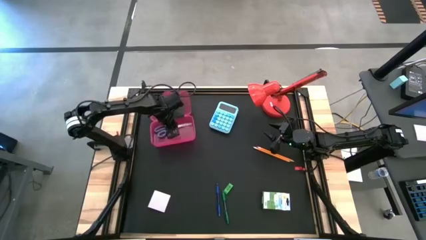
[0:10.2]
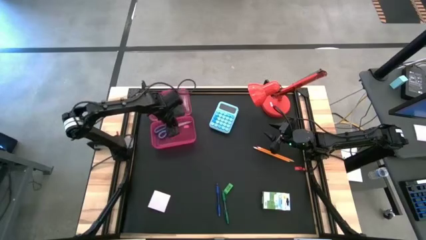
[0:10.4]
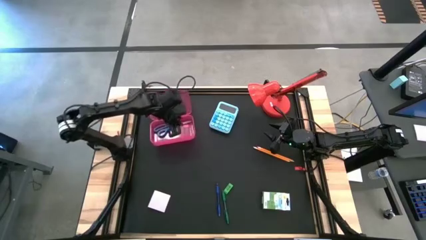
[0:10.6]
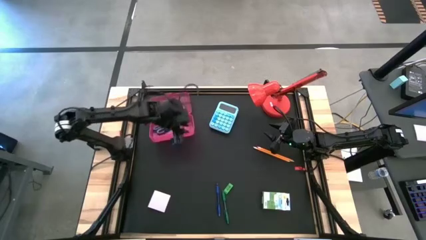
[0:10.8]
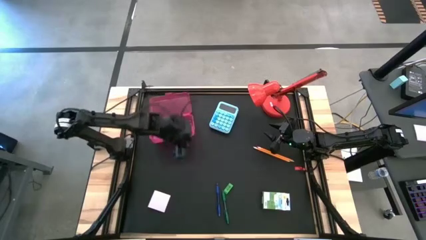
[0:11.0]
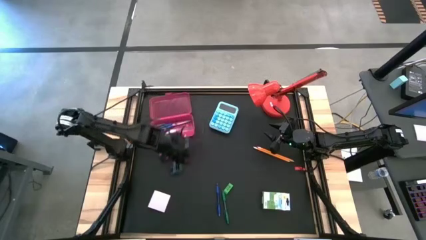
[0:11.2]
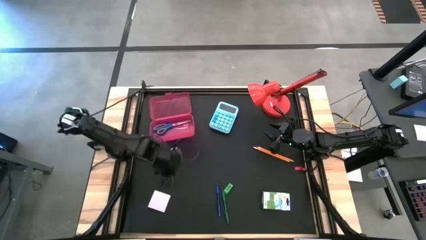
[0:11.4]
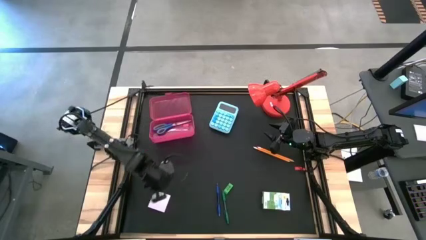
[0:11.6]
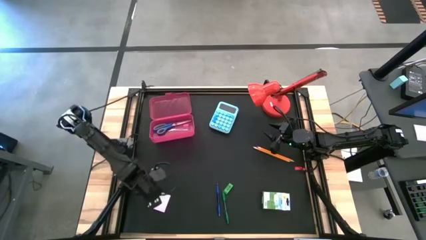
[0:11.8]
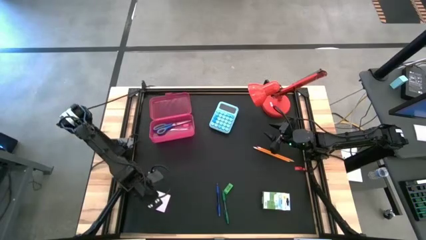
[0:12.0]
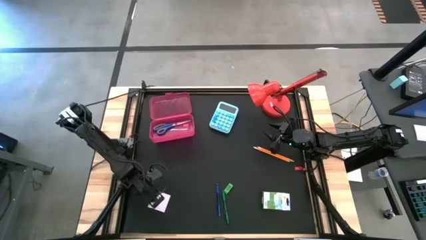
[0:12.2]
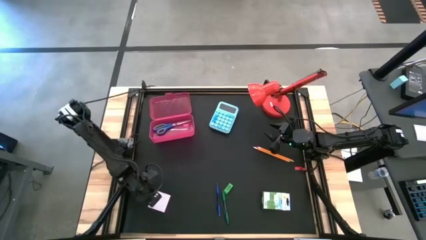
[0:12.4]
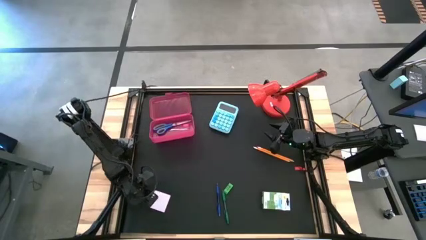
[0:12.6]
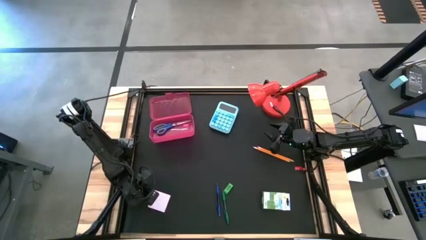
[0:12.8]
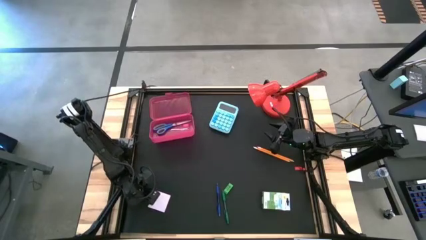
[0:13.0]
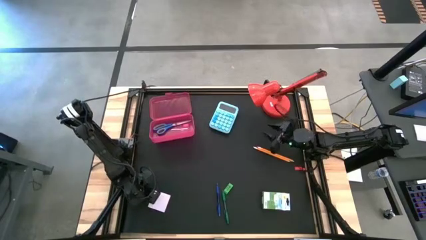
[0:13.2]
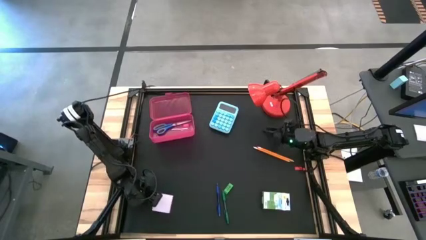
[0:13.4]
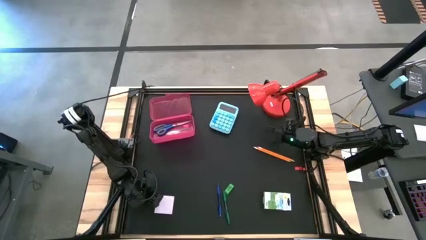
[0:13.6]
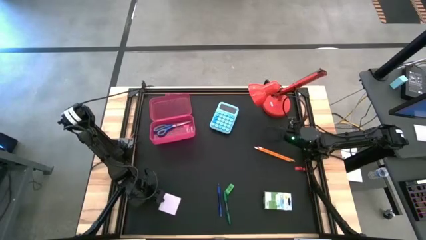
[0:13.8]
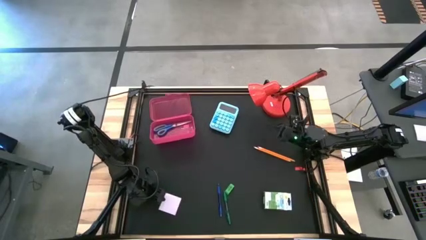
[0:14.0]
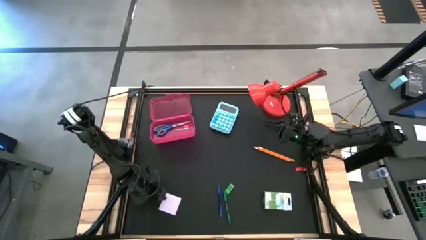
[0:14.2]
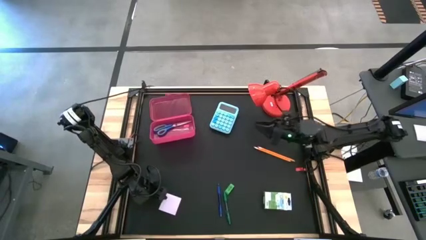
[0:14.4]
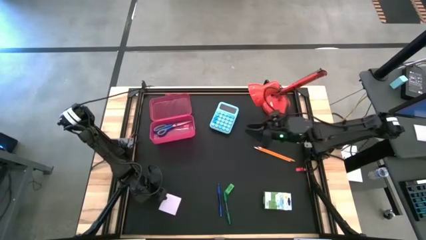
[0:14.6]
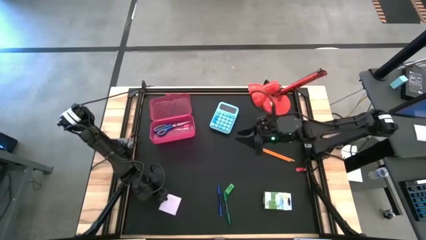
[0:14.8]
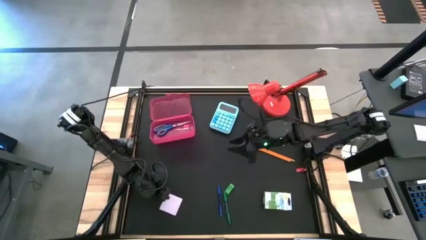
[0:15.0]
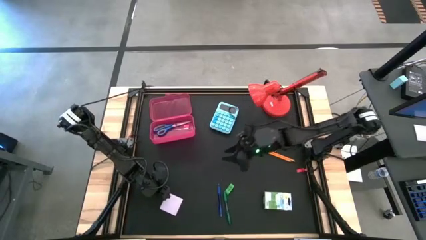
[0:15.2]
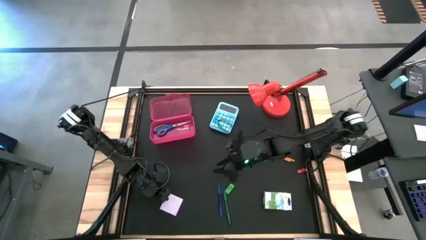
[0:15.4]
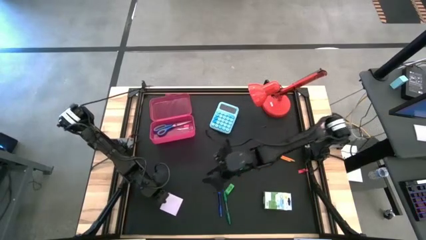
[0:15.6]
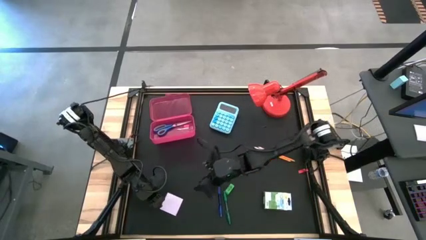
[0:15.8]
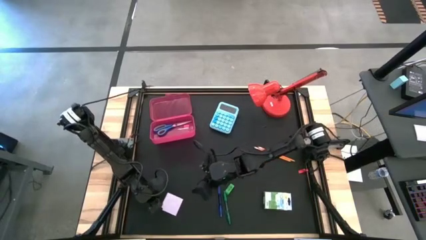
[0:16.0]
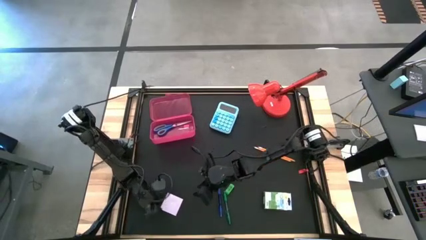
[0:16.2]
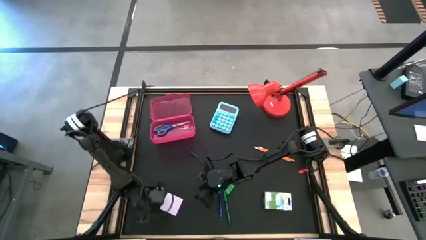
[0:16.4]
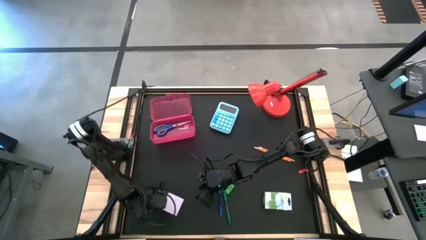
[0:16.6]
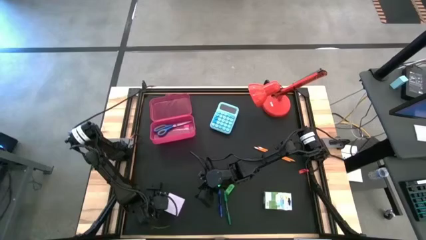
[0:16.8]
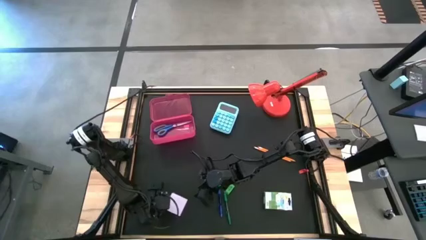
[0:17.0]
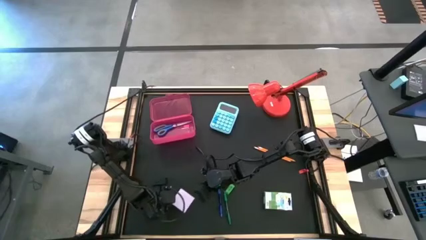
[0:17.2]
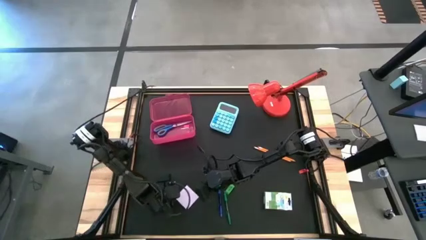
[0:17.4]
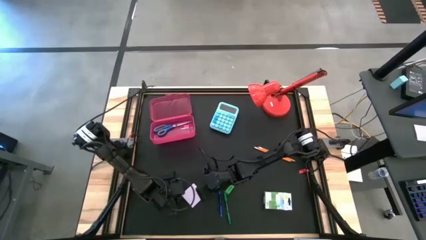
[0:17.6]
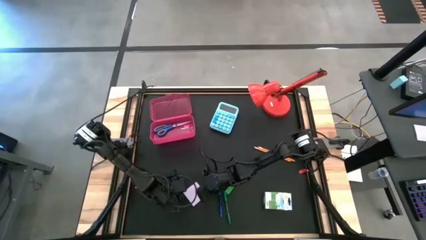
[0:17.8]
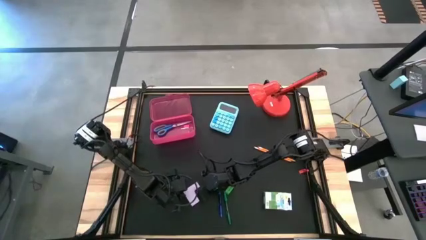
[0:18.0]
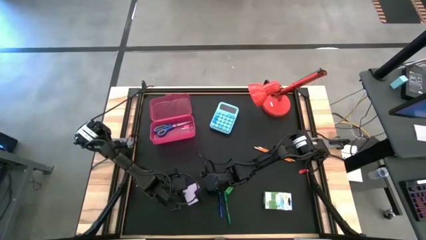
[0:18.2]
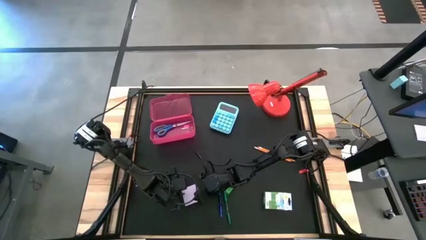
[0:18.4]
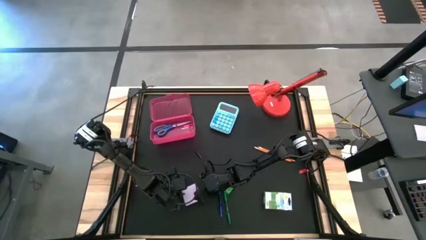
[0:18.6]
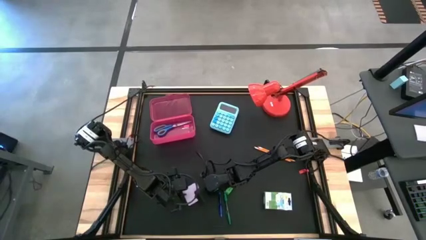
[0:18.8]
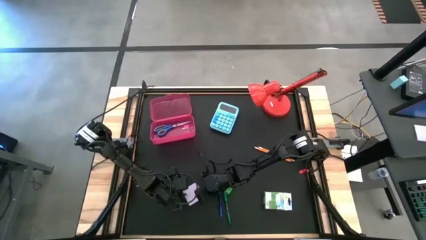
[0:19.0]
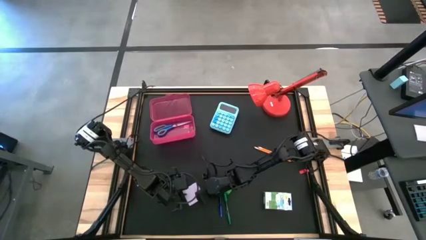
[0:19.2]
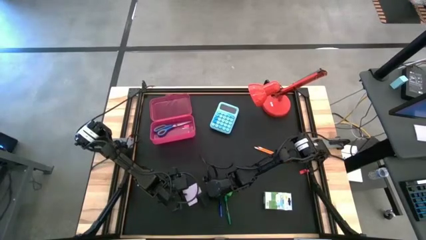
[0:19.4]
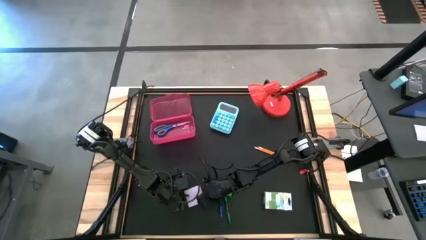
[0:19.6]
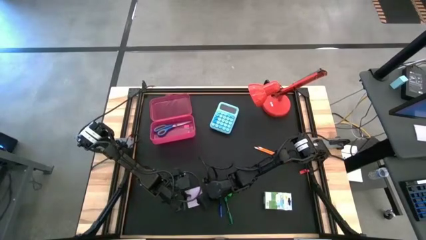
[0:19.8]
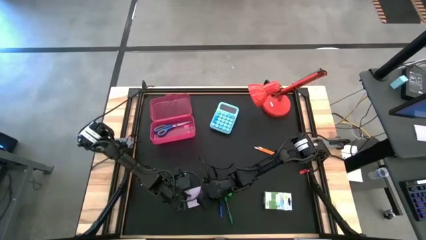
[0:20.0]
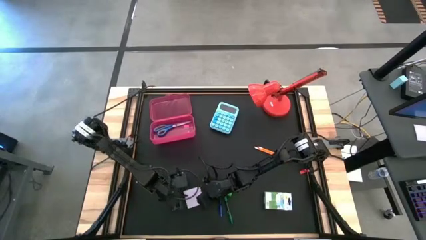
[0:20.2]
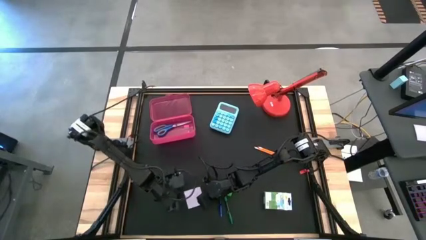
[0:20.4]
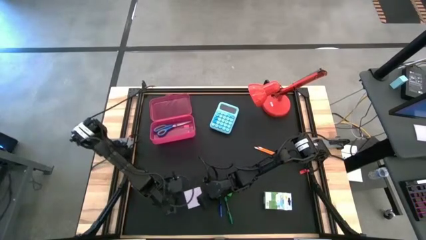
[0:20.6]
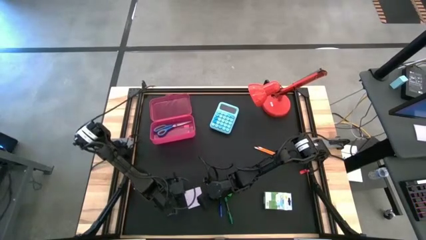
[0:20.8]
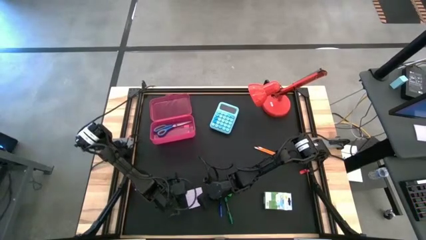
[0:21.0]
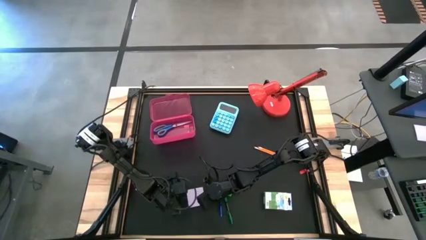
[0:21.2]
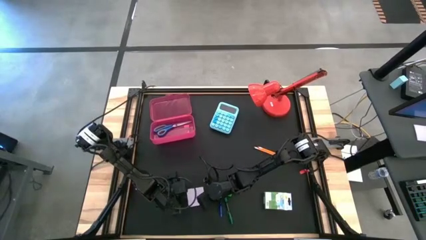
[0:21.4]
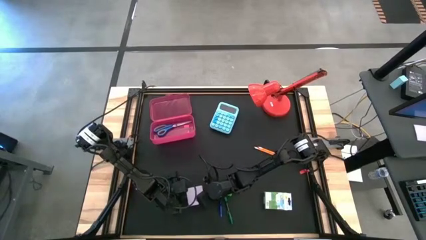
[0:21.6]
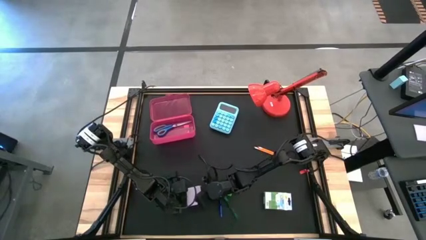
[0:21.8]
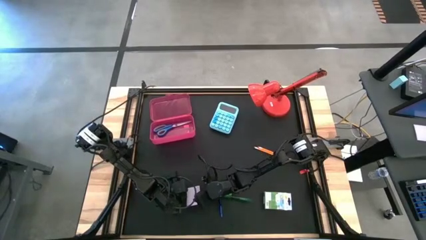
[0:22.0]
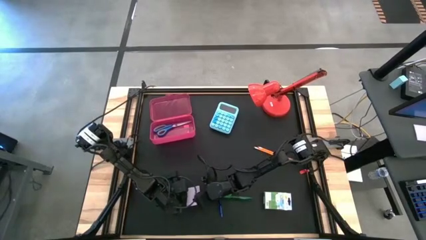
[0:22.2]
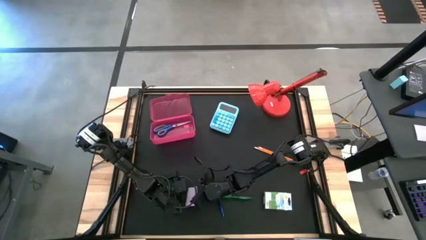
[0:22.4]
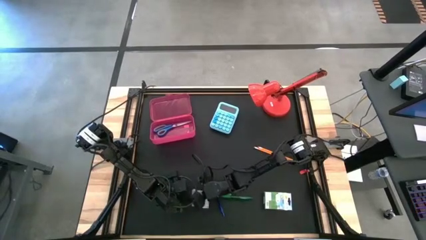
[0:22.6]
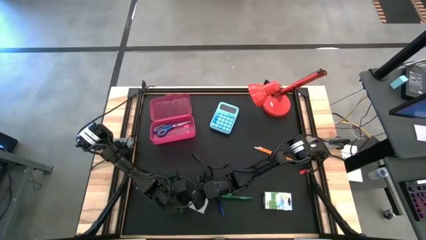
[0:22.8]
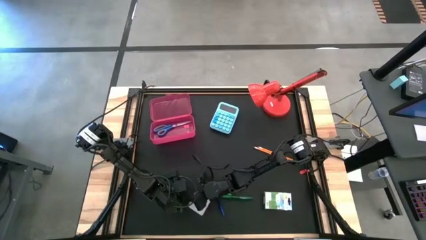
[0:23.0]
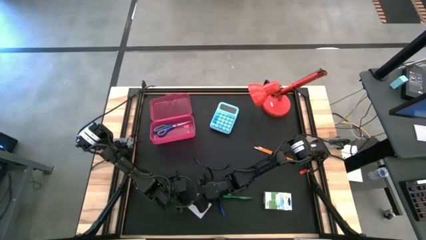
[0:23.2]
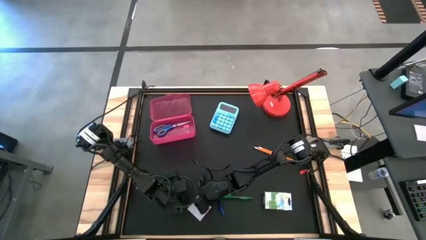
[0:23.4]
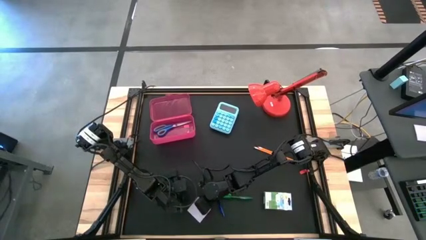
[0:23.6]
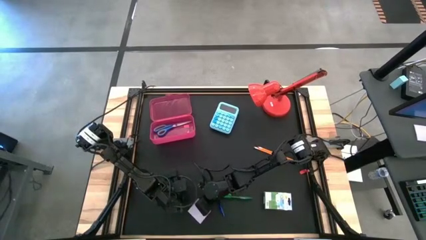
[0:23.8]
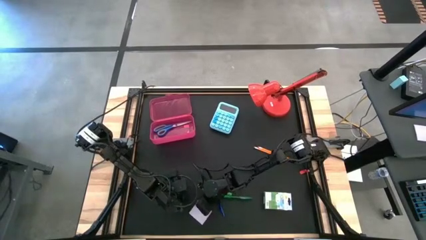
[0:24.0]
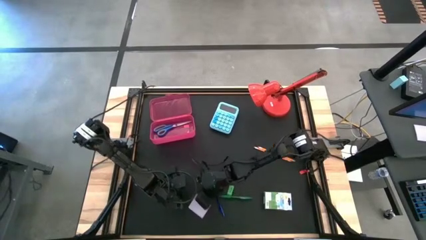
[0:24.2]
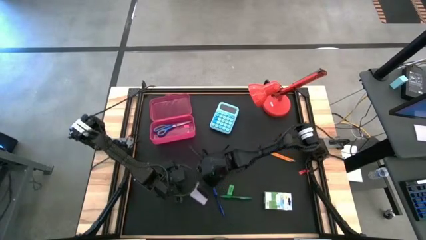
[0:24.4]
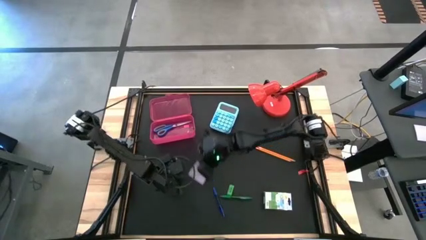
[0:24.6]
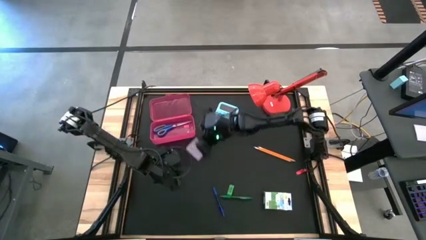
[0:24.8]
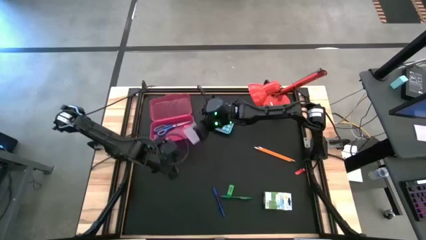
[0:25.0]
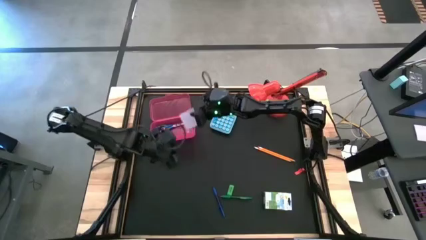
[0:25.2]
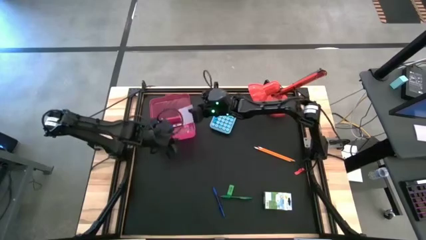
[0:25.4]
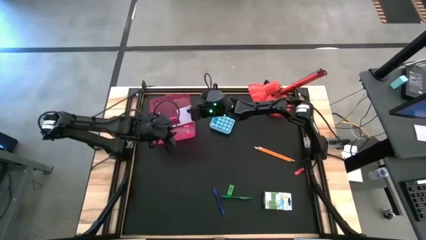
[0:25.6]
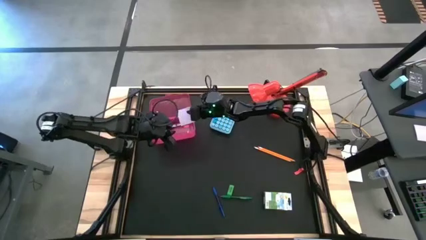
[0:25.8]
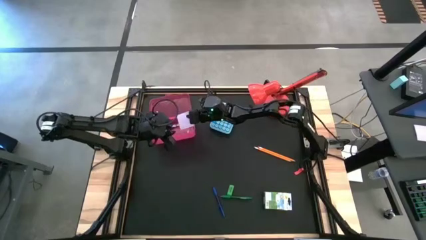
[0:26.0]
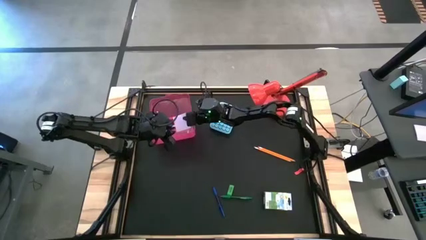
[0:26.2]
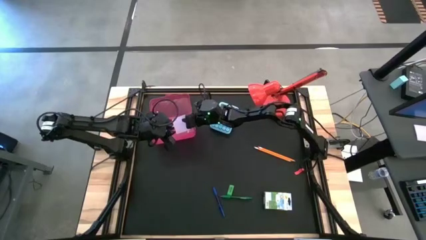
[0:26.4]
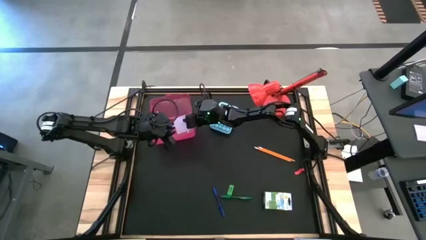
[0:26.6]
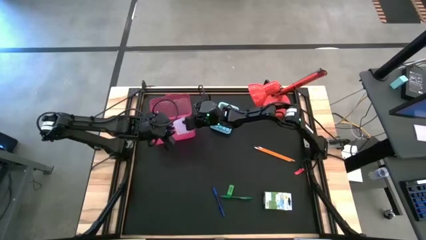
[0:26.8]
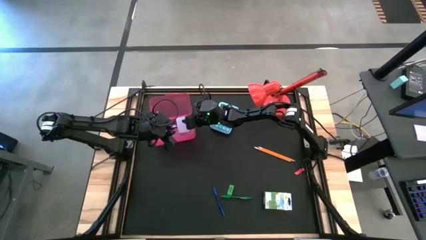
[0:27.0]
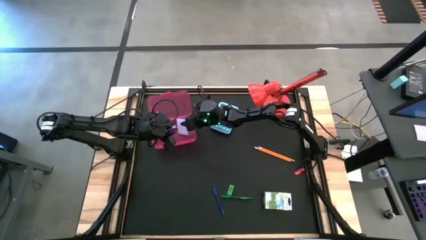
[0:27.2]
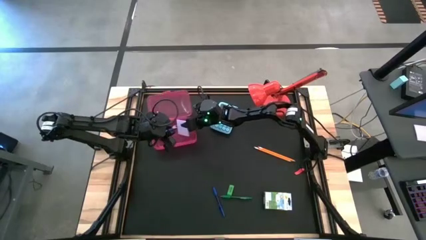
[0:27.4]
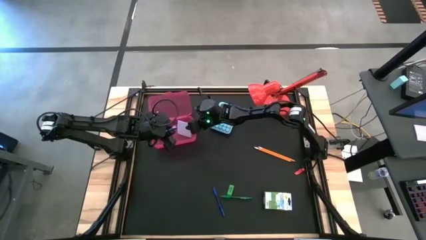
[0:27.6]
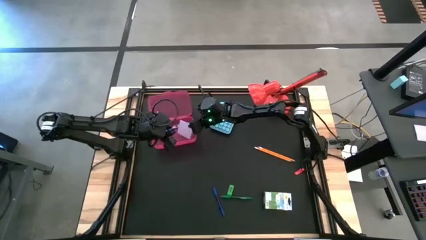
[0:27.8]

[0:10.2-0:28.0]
Task: Pack school essentials
Put the white sticky note into the pink supply box
